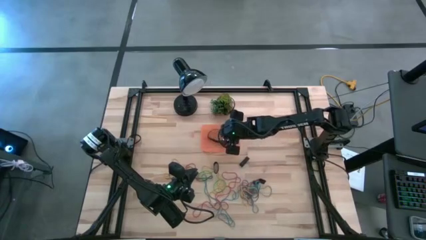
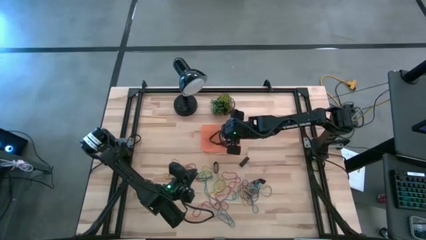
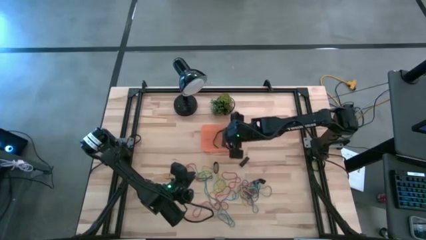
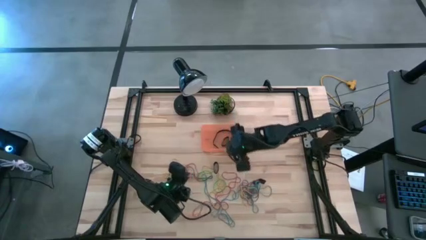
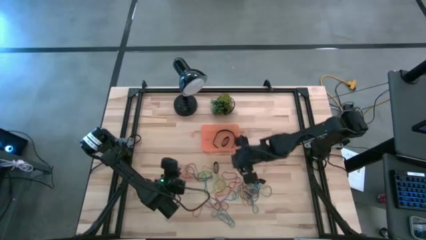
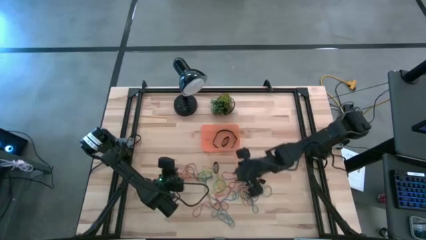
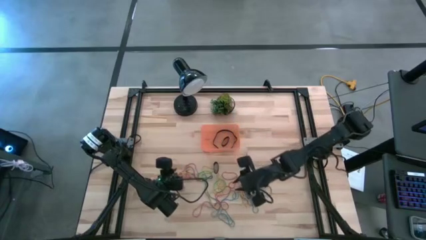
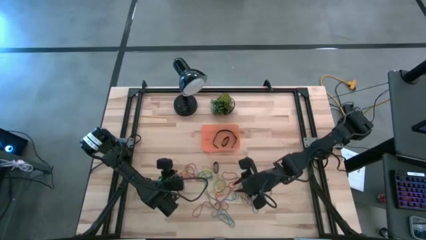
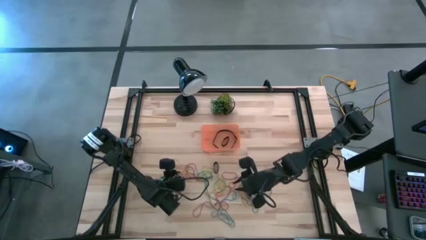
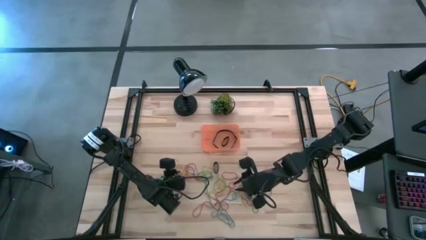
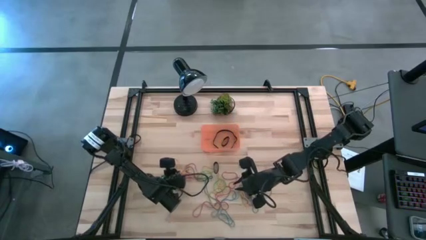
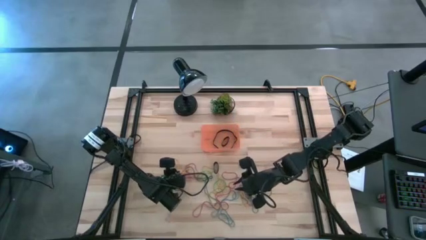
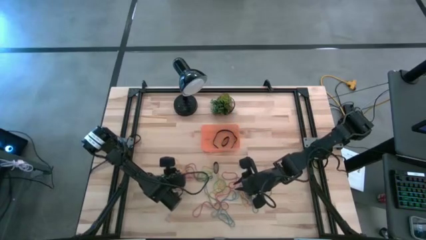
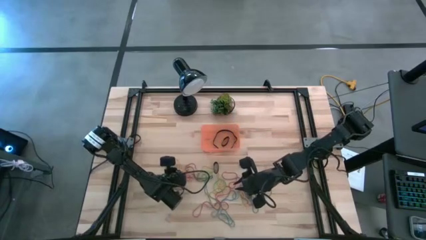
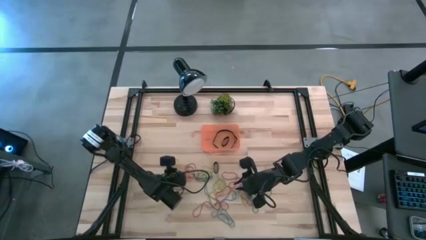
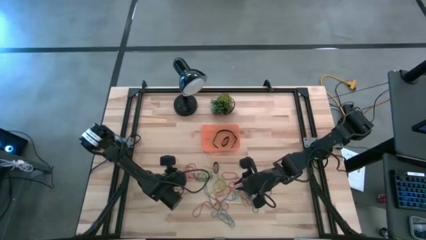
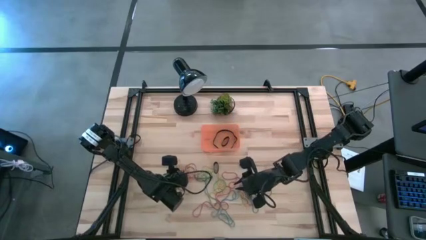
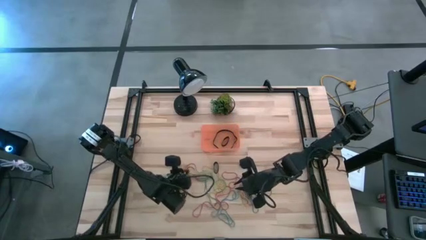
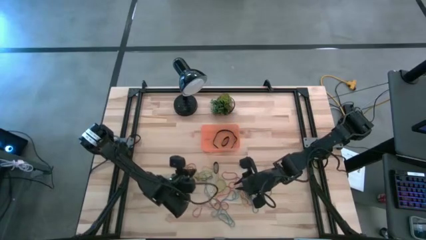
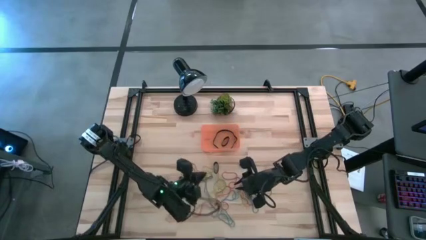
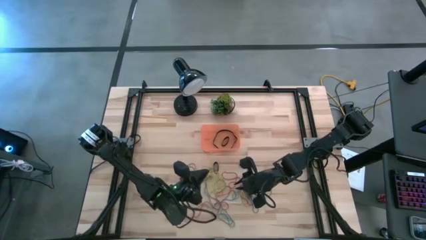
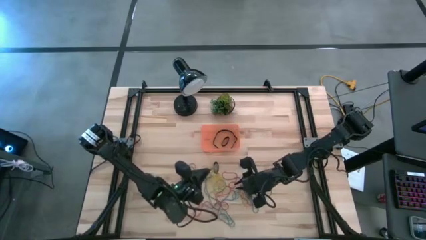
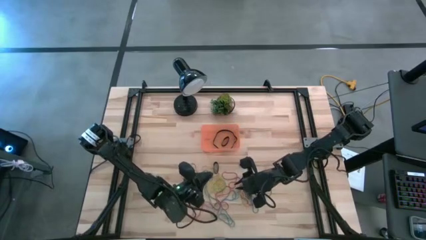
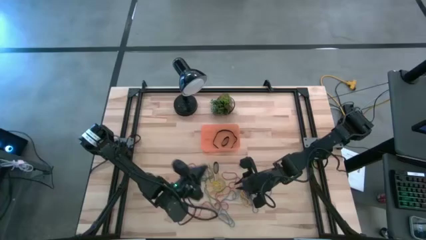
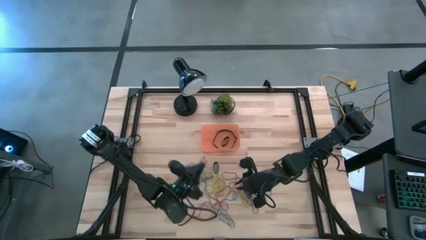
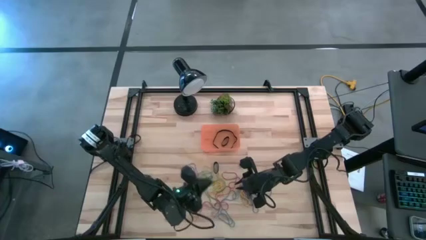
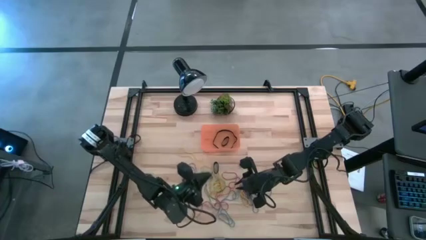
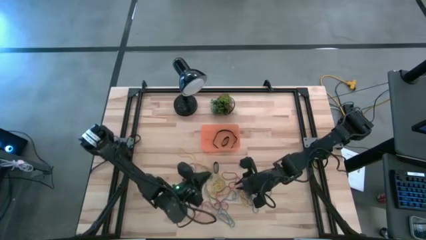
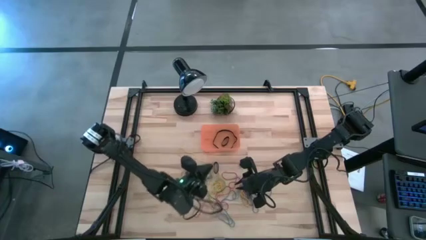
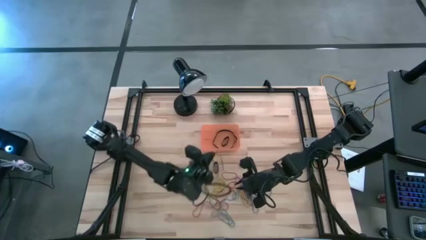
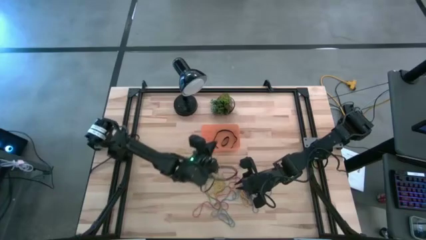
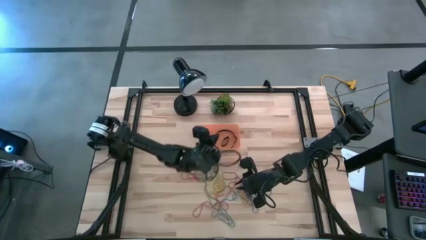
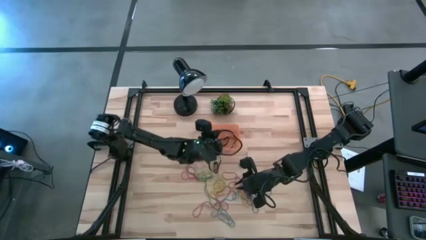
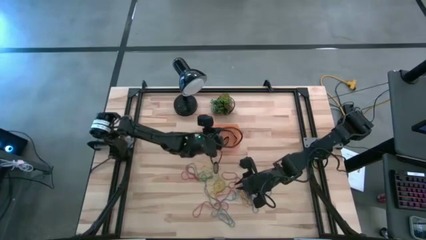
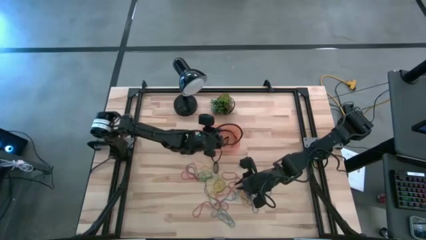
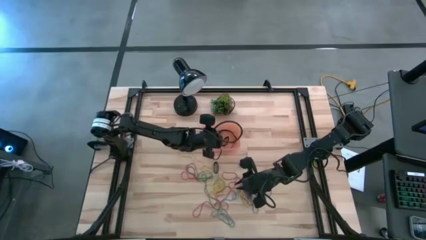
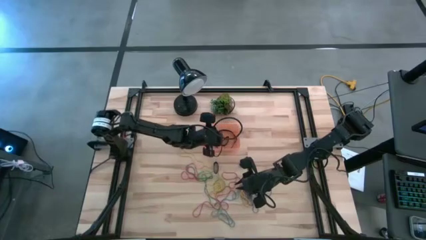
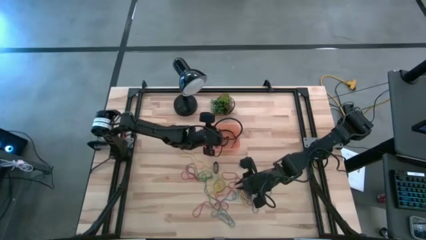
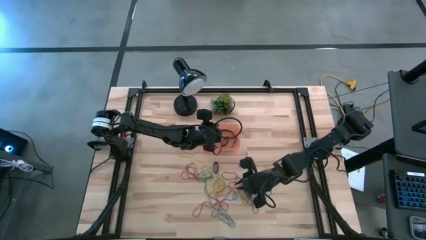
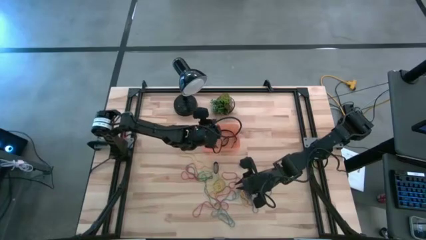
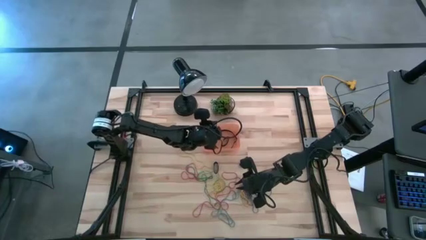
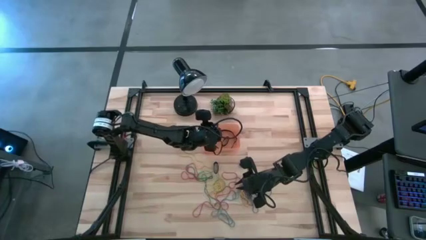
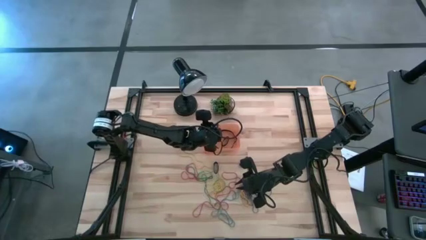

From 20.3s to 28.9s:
Task: Pick and place rubber bands into bin
Put the violet rubber band into the orange bin

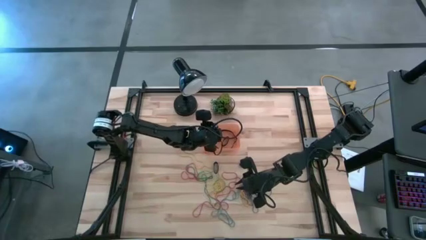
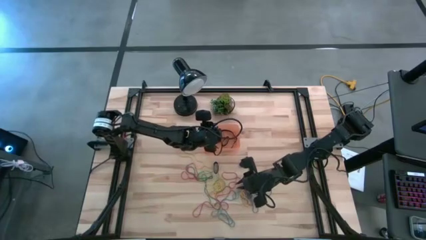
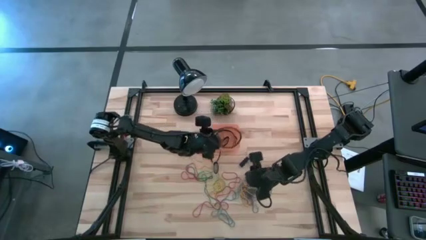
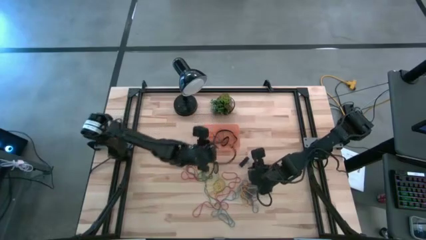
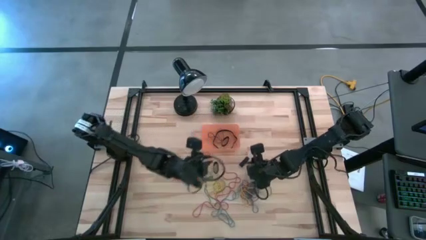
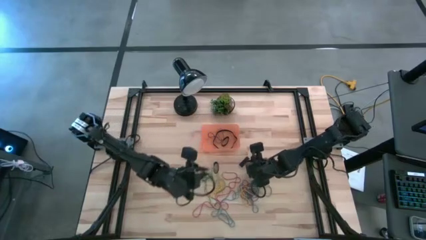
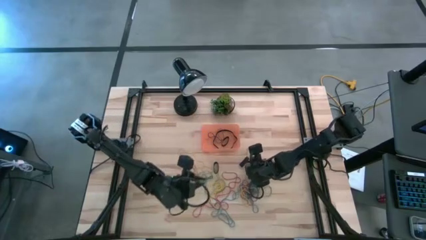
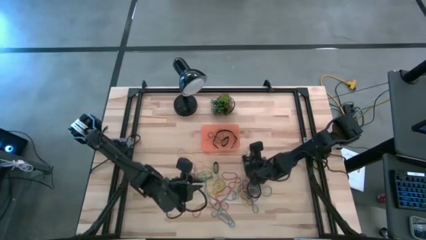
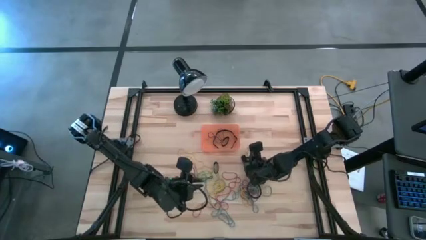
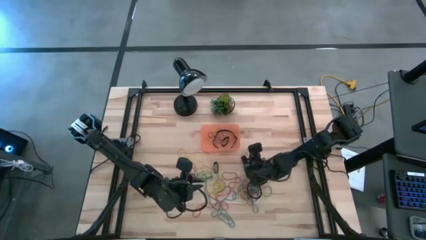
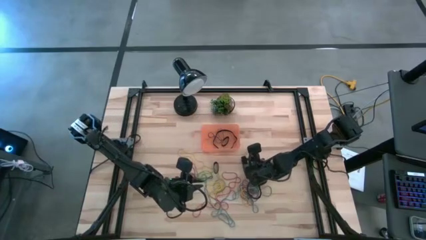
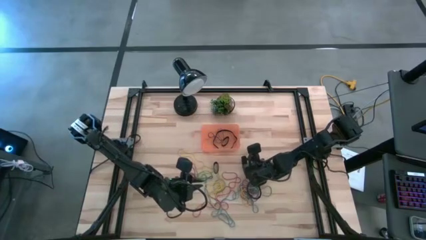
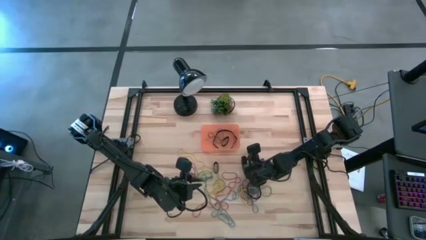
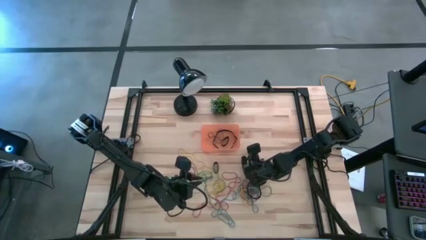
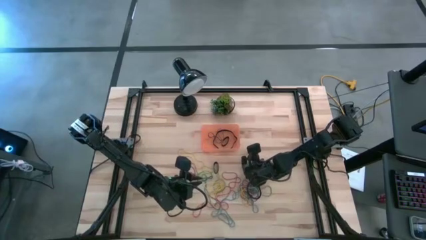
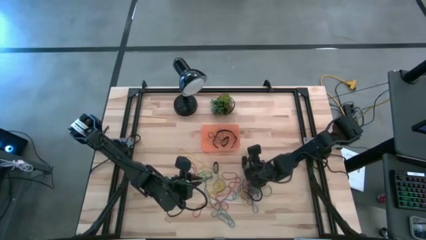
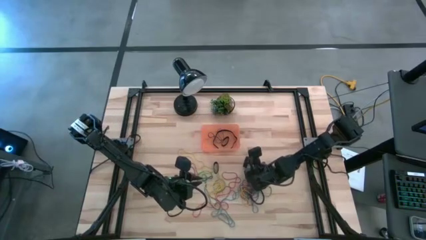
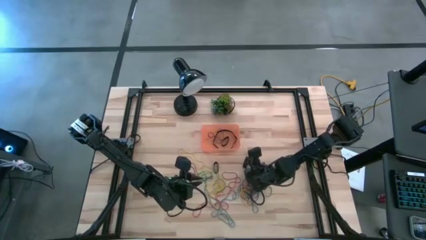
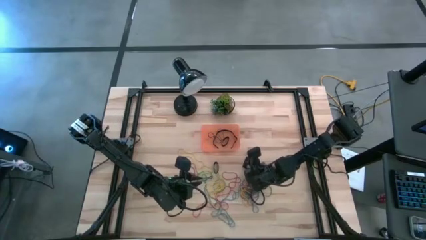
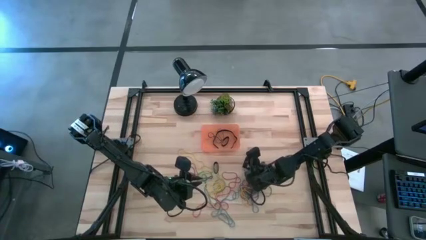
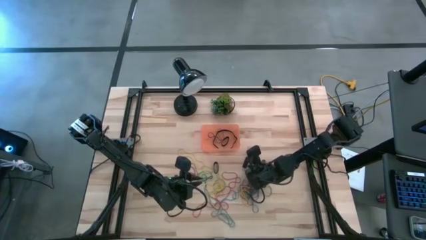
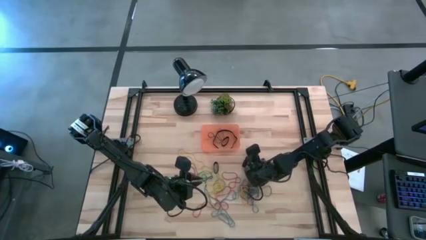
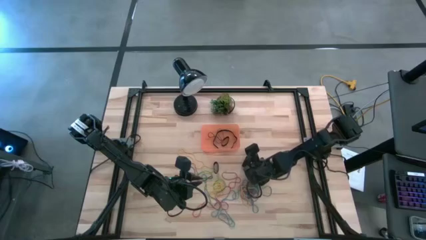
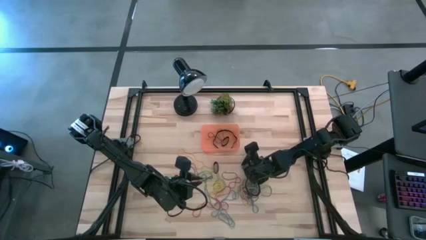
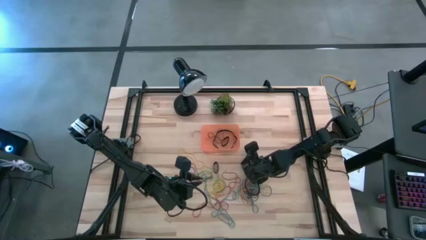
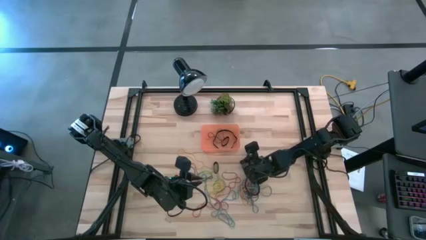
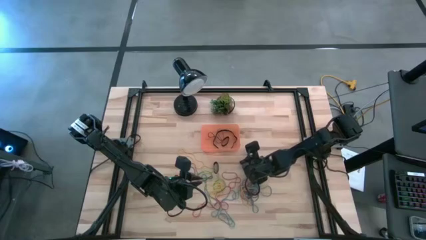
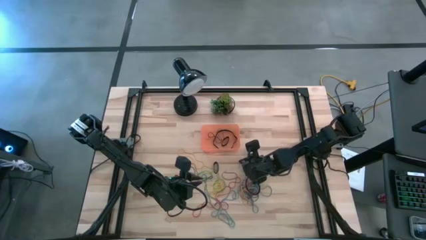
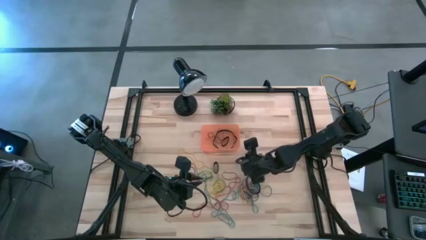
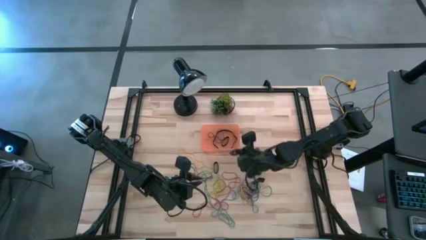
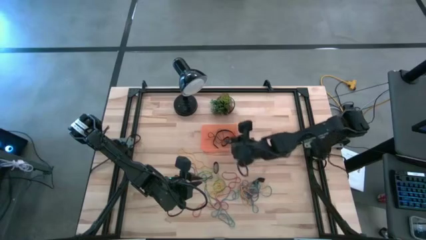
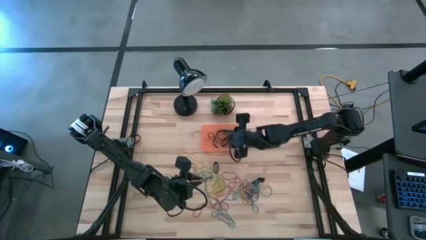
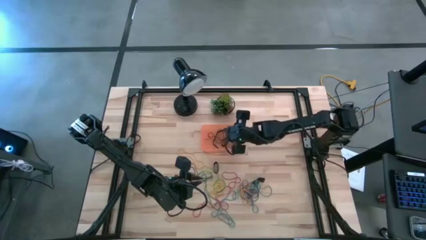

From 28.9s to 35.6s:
Put the black rubber band into the orange bin
